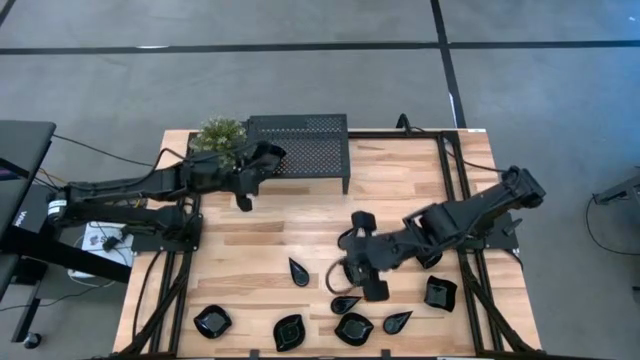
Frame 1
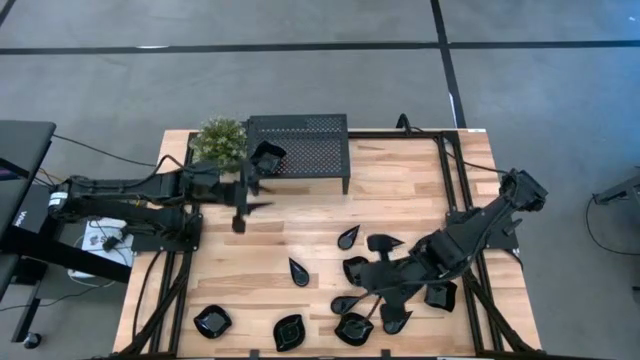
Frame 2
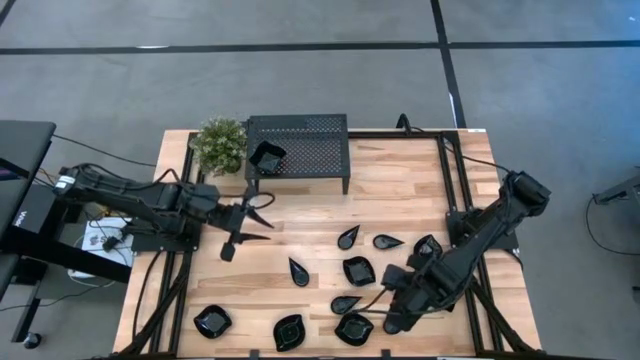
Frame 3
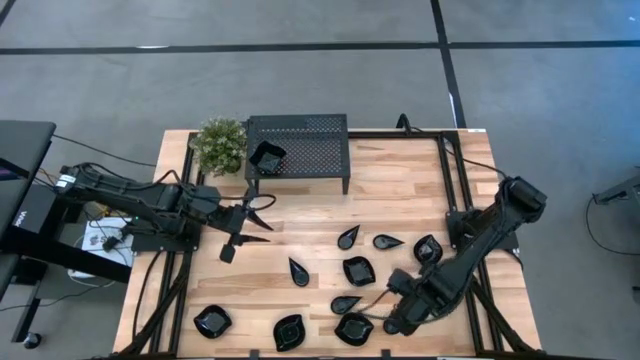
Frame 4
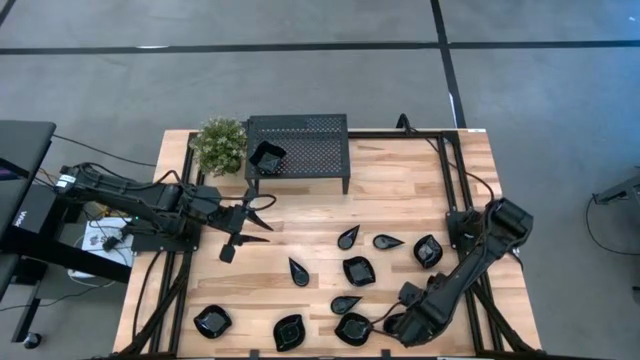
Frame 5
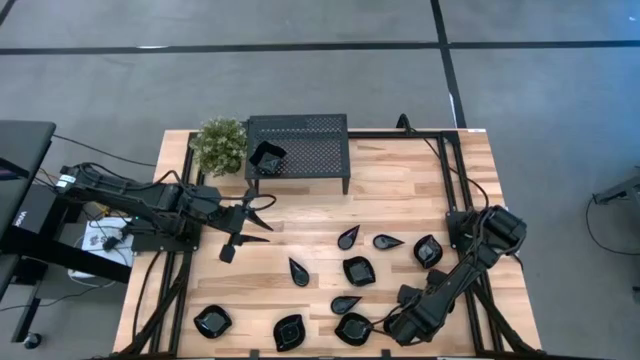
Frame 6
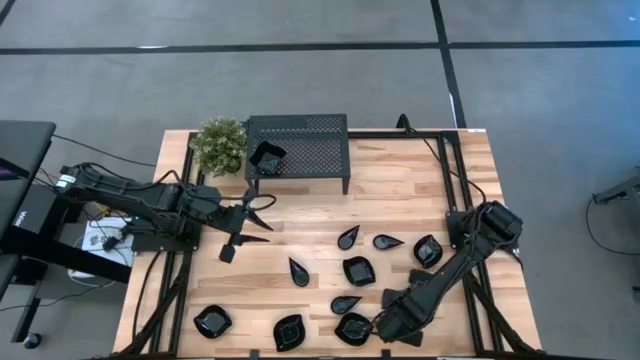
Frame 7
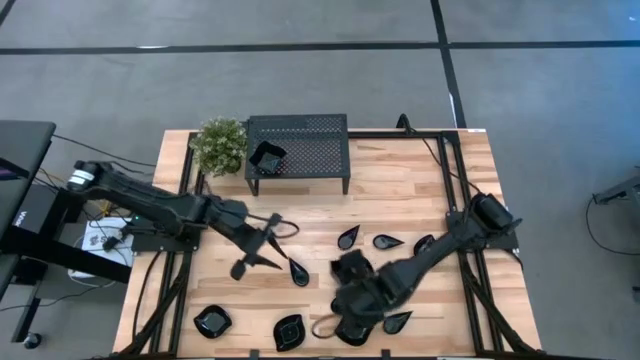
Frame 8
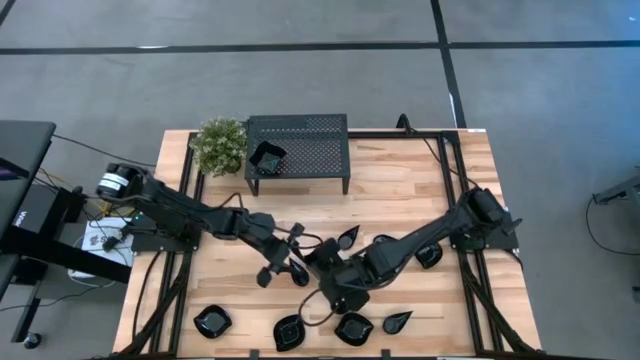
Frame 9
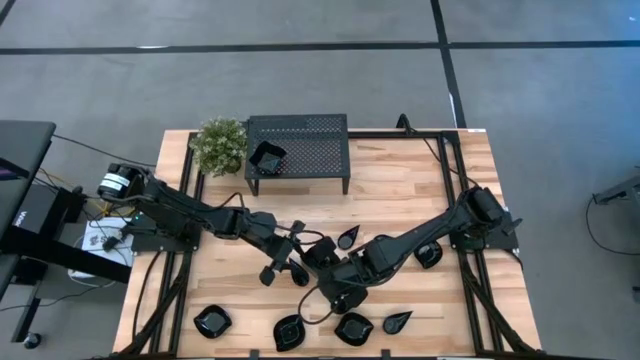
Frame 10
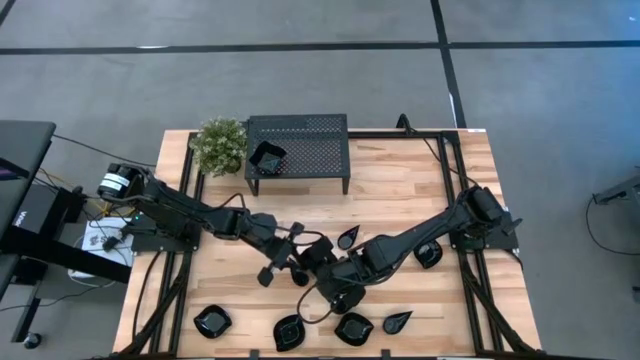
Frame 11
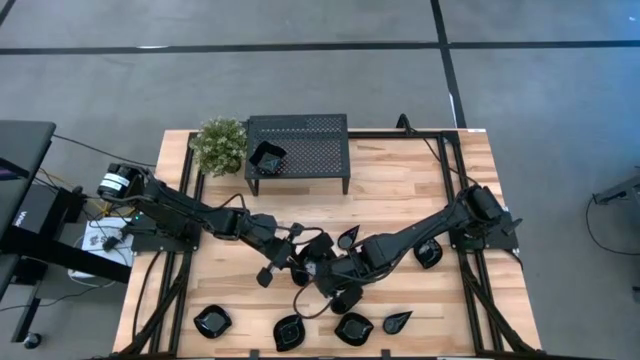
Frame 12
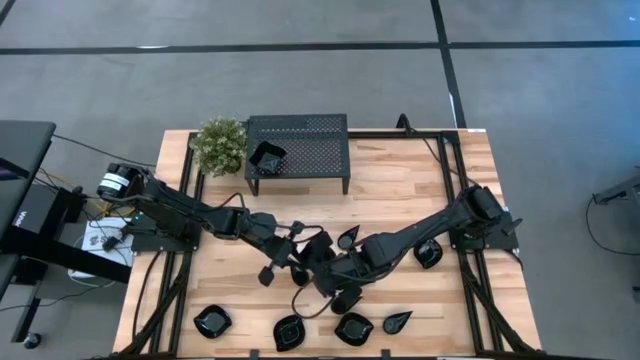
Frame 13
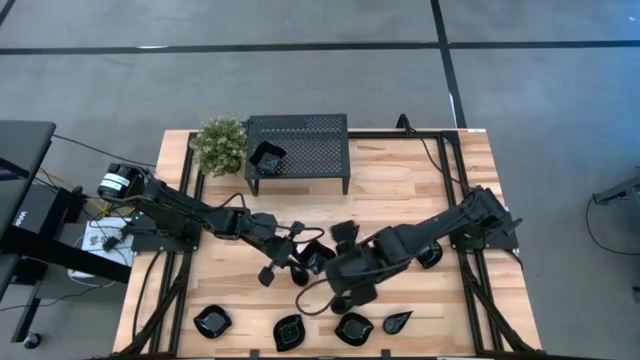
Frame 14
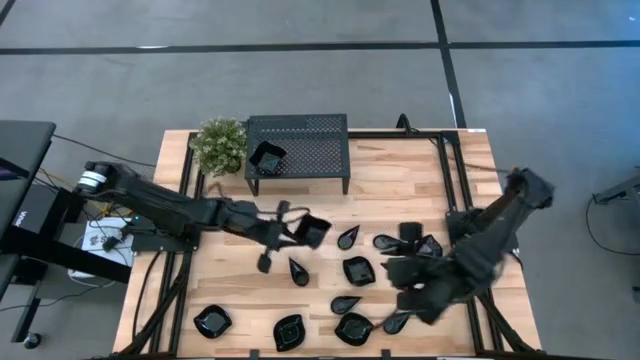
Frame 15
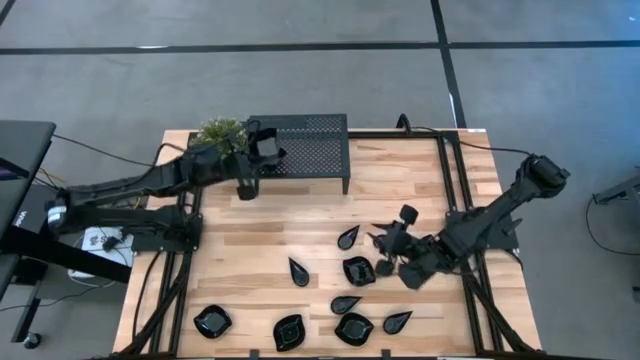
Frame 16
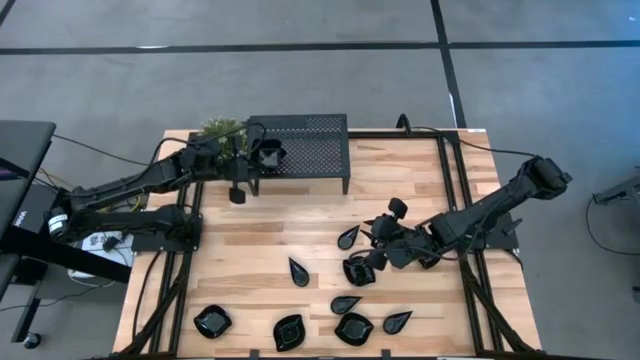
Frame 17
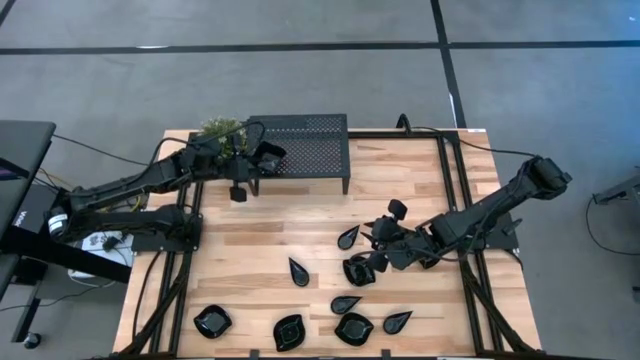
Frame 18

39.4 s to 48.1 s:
Task: Pick & Place Mini shaped plates
Stack the distorted square plate on top of the distorted square plate on the shelf

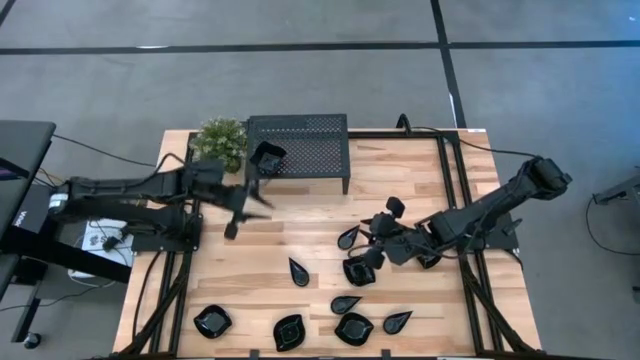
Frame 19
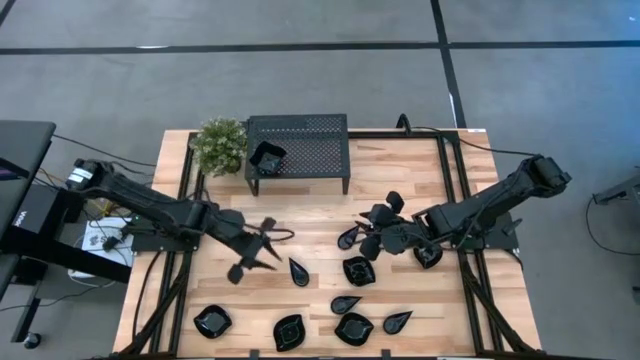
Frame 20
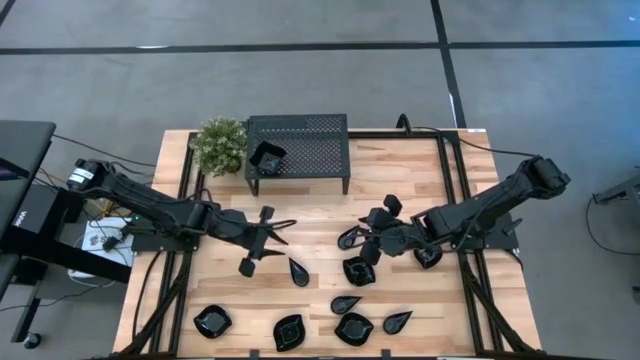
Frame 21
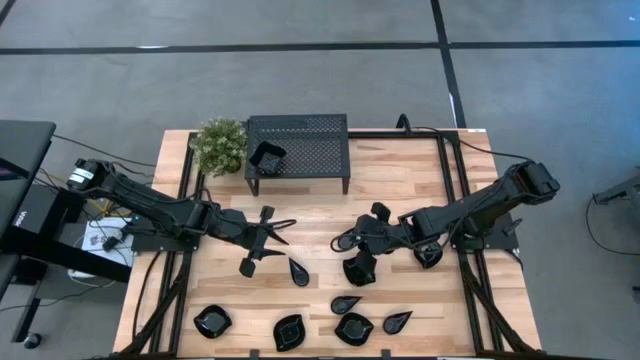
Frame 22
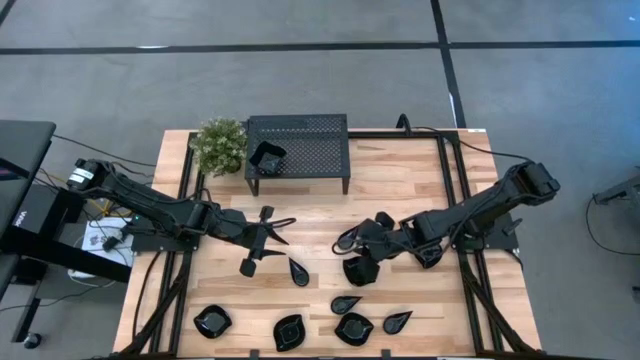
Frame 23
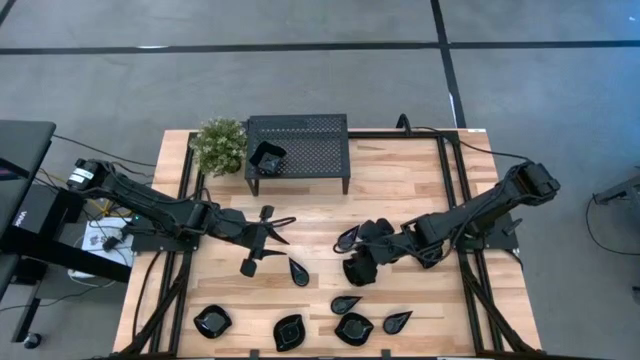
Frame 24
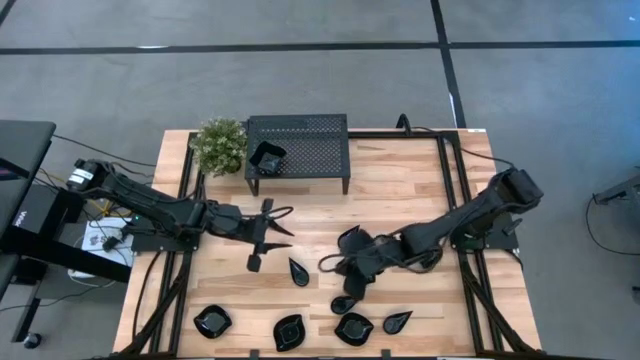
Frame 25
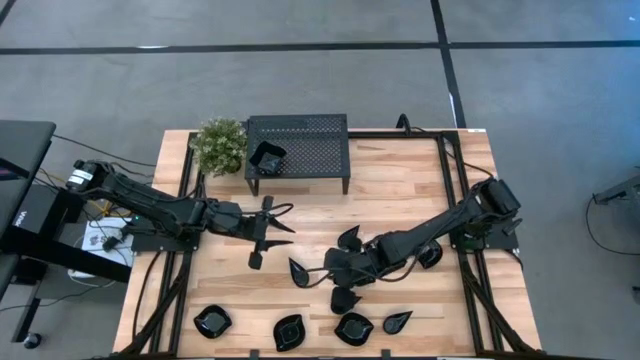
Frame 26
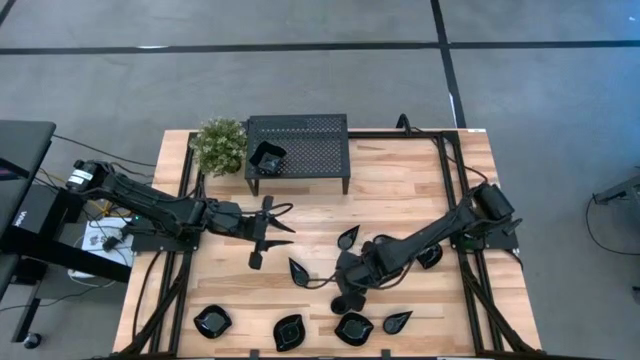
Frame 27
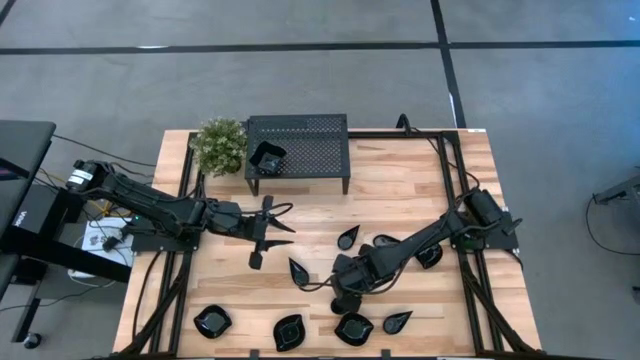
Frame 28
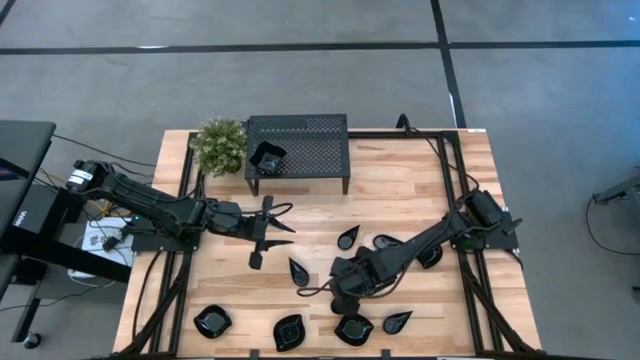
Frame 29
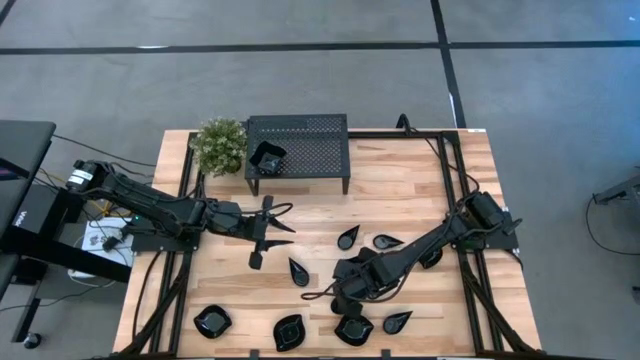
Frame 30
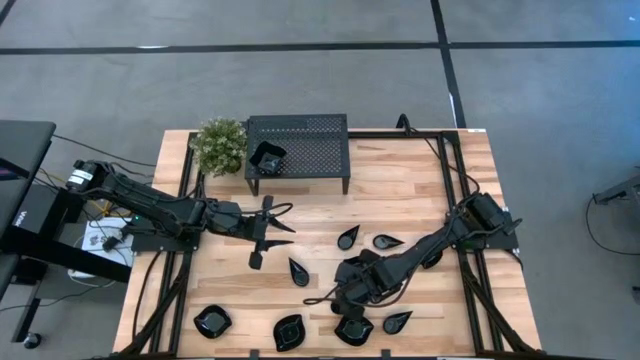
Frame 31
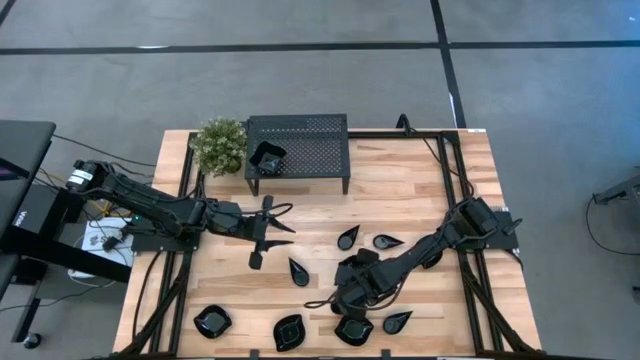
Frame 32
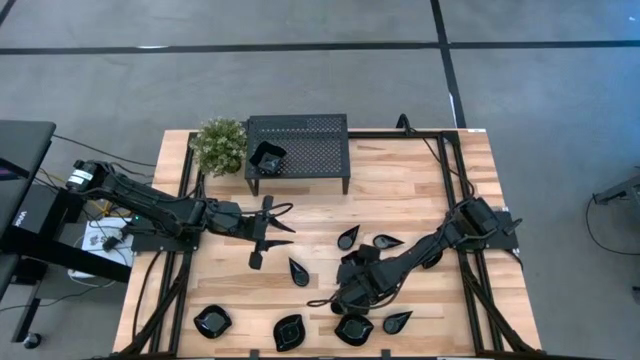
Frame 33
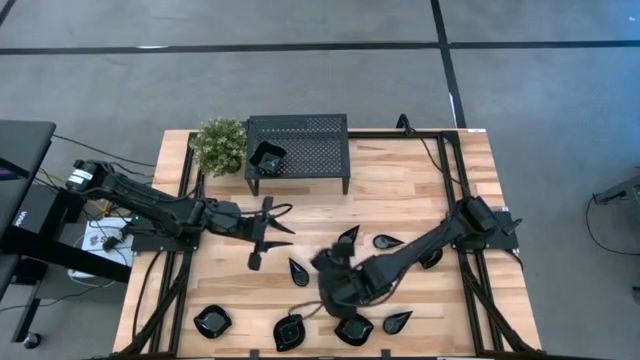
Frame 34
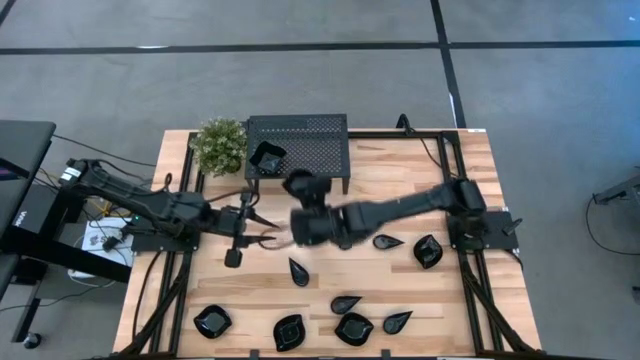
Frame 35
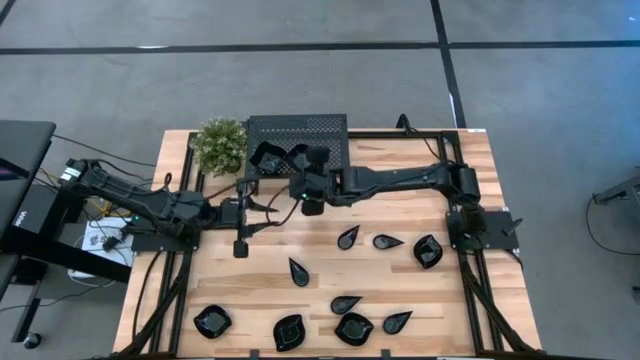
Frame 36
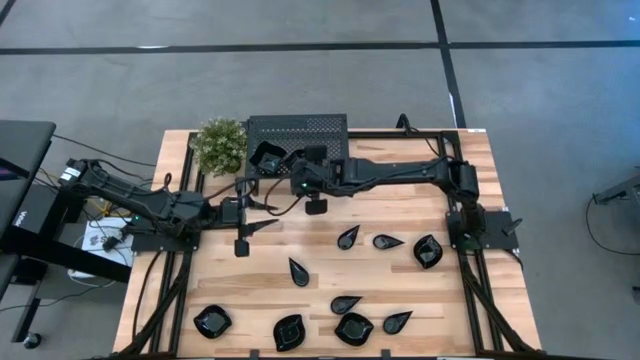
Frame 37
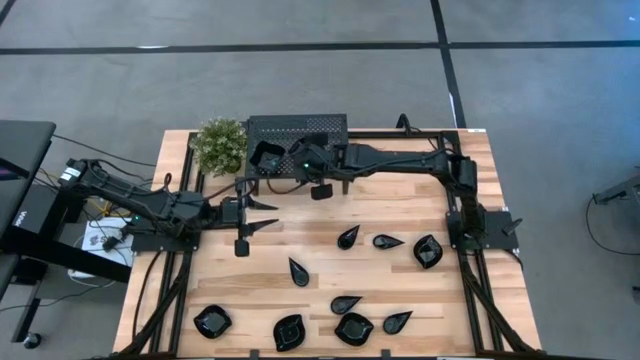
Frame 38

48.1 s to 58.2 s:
Put the leaf shaped plate on the shelf

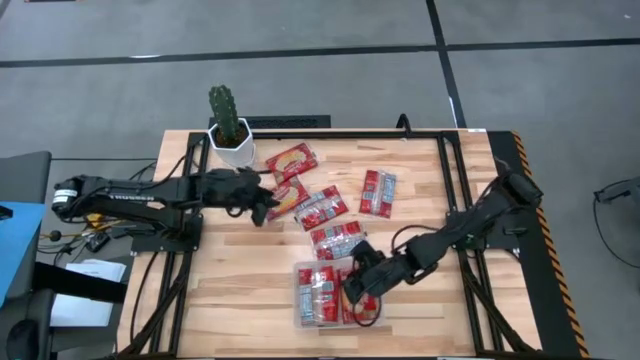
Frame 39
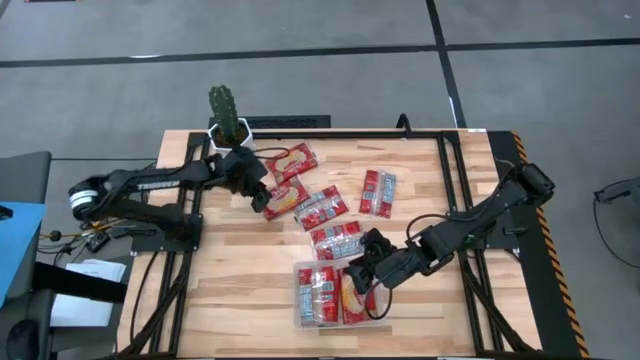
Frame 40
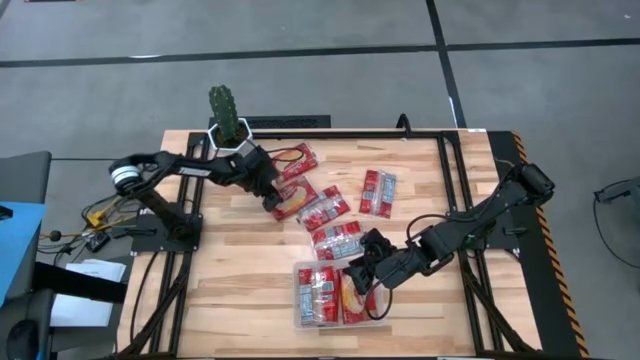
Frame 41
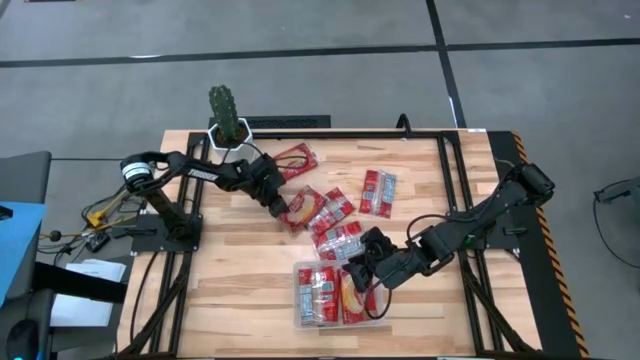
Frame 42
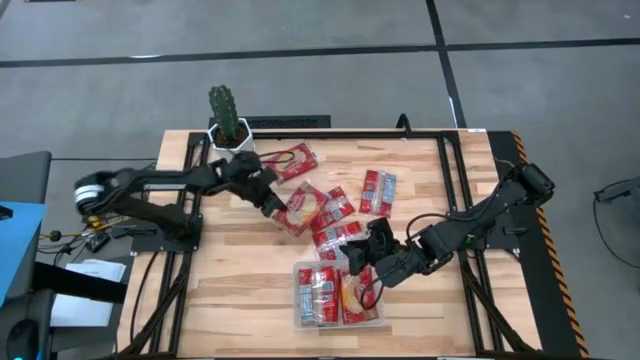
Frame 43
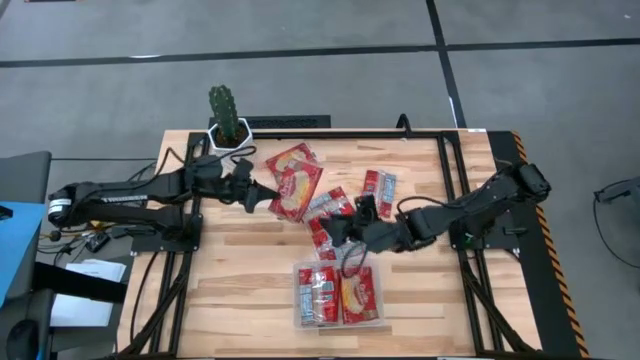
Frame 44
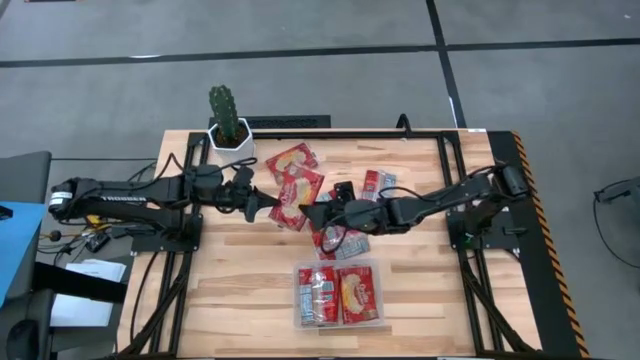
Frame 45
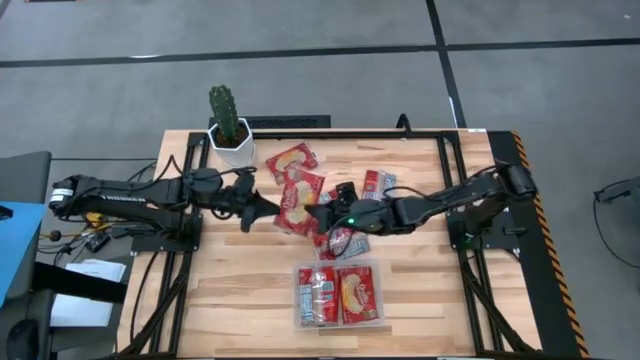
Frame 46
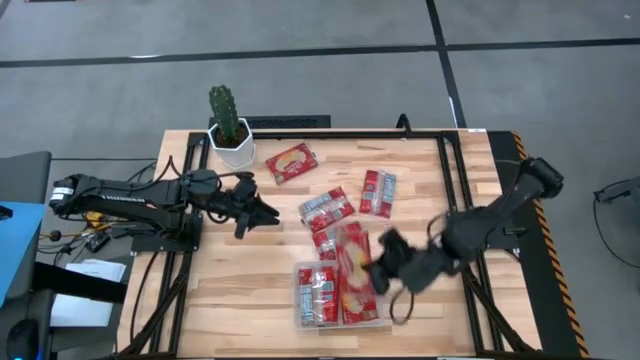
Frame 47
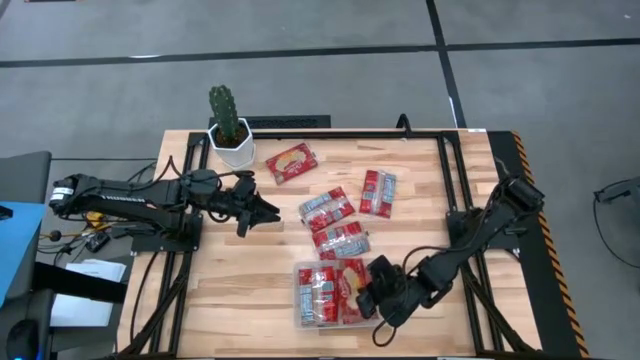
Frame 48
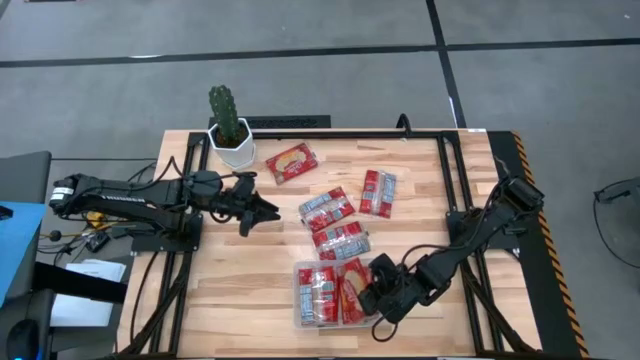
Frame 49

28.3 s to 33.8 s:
Task: Sort popcorn bags into baskets
Put the red popcorn bag into the transparent bin
